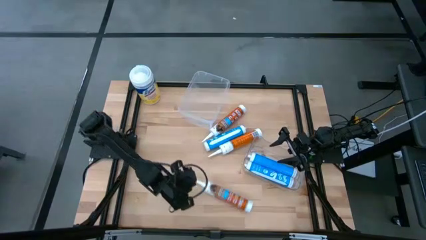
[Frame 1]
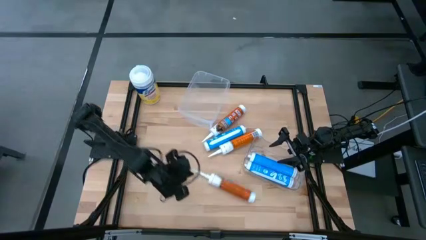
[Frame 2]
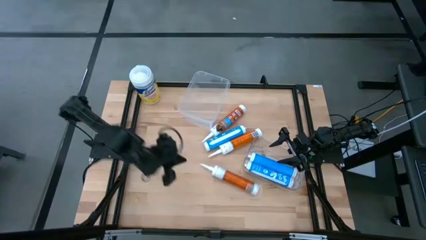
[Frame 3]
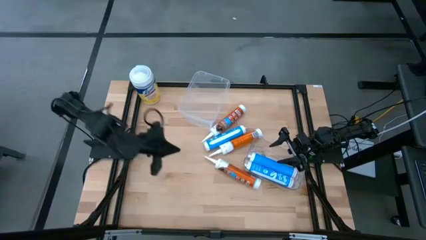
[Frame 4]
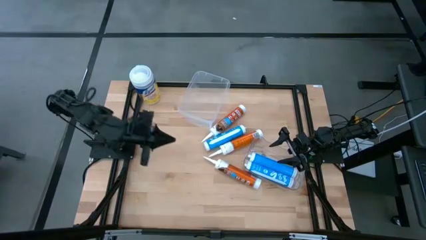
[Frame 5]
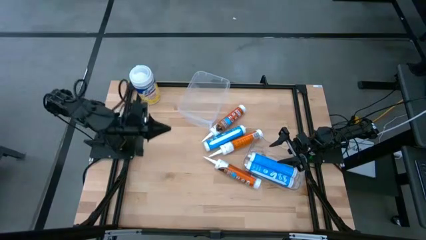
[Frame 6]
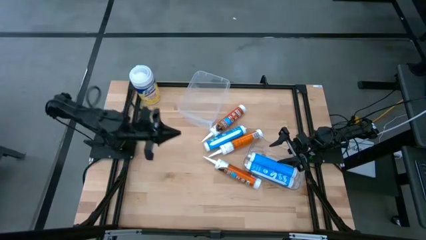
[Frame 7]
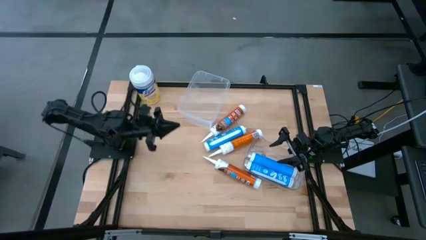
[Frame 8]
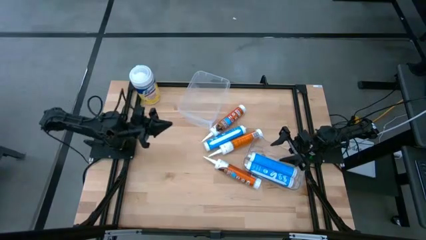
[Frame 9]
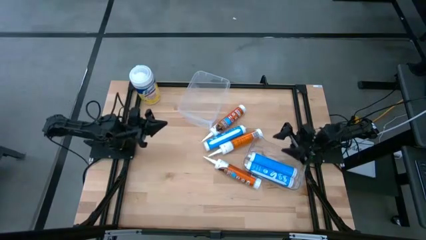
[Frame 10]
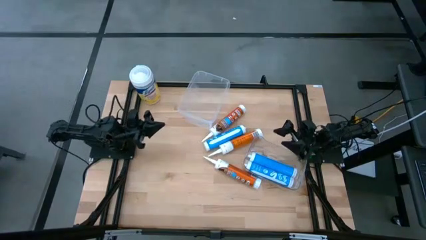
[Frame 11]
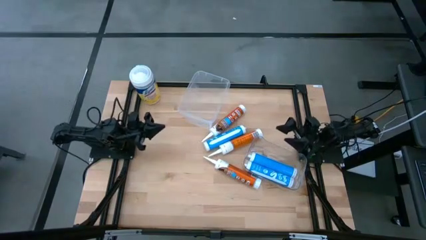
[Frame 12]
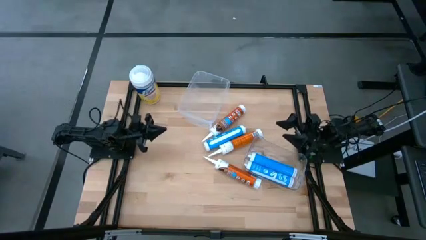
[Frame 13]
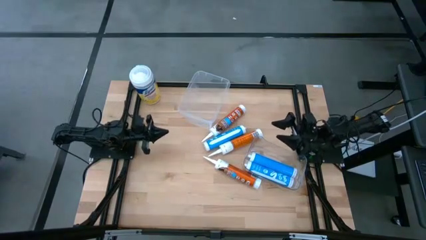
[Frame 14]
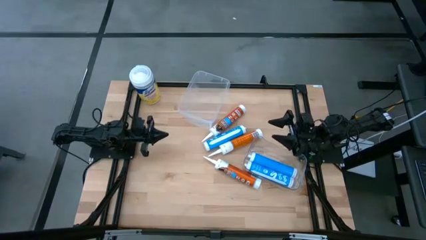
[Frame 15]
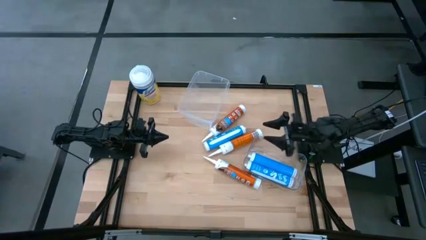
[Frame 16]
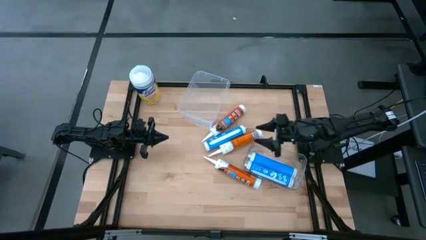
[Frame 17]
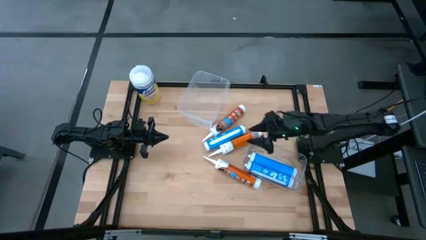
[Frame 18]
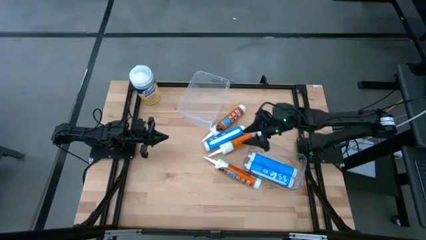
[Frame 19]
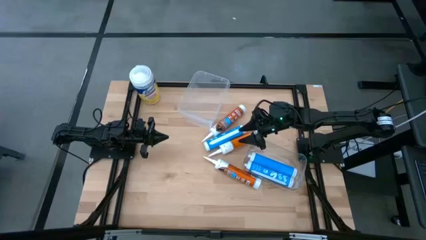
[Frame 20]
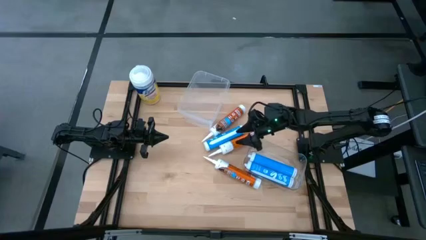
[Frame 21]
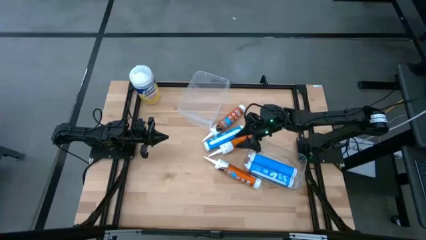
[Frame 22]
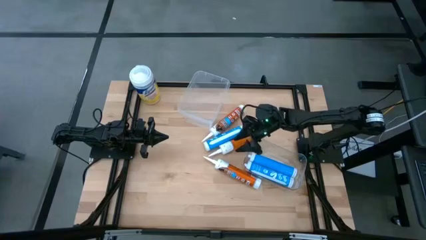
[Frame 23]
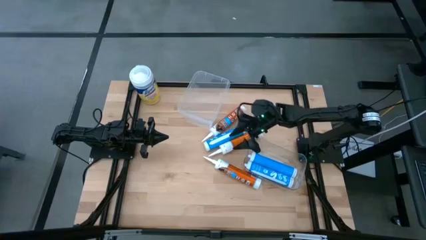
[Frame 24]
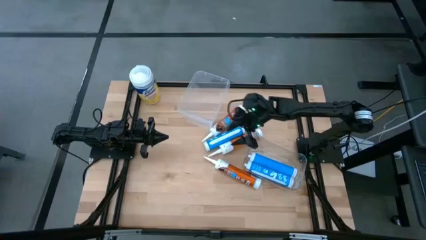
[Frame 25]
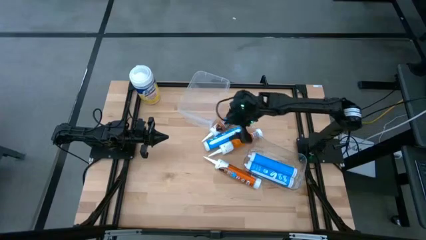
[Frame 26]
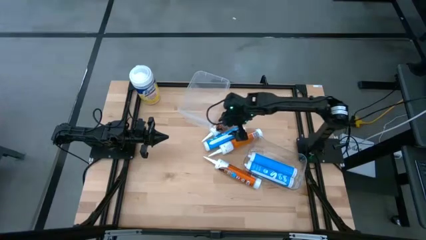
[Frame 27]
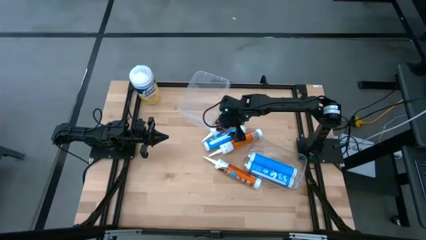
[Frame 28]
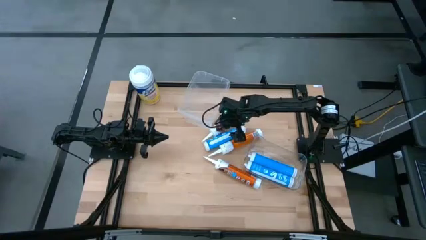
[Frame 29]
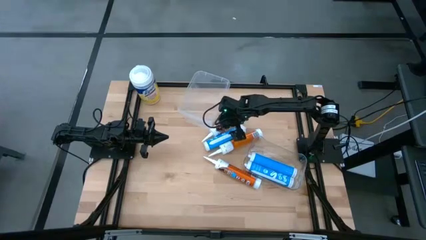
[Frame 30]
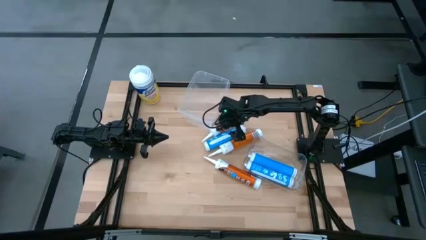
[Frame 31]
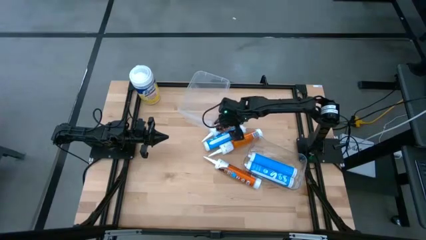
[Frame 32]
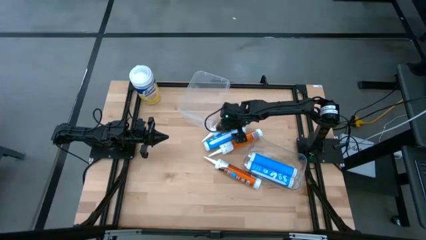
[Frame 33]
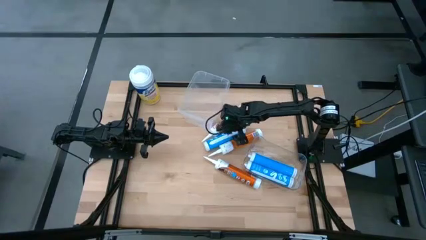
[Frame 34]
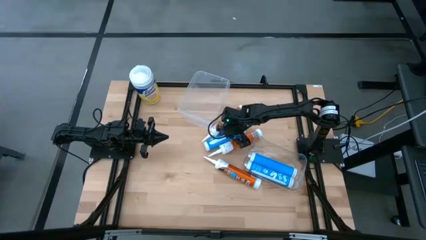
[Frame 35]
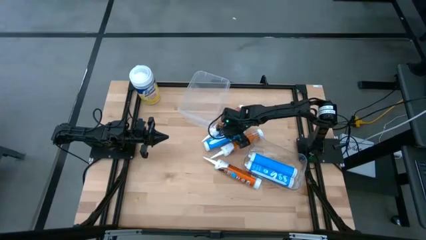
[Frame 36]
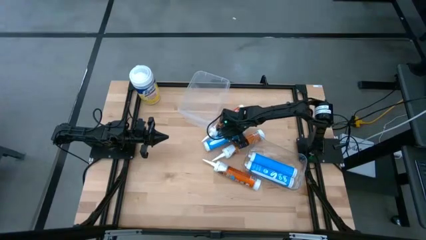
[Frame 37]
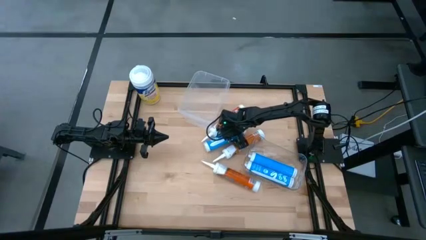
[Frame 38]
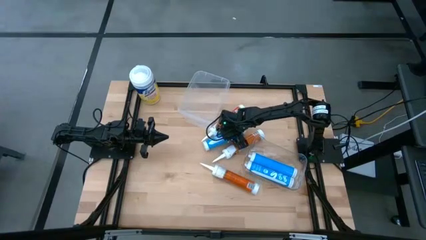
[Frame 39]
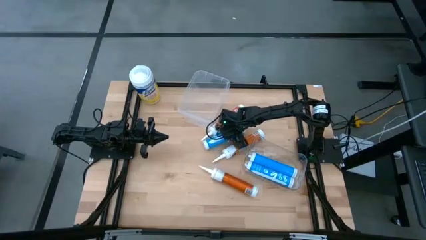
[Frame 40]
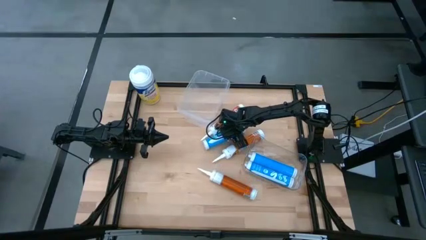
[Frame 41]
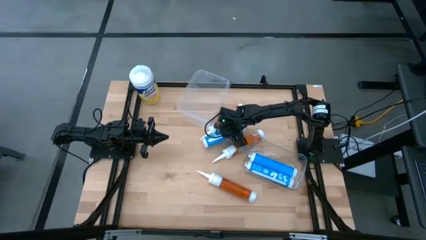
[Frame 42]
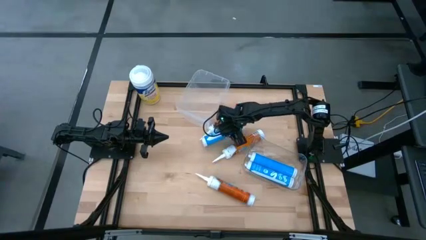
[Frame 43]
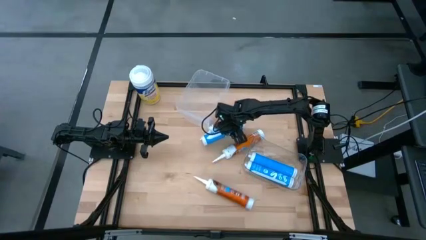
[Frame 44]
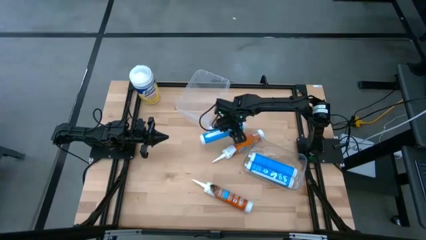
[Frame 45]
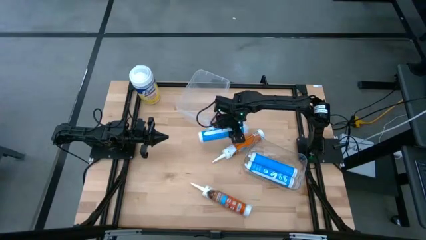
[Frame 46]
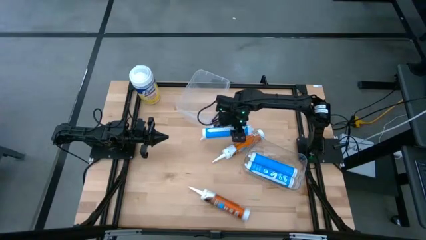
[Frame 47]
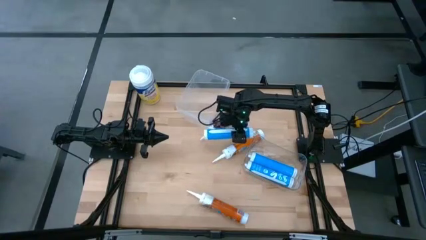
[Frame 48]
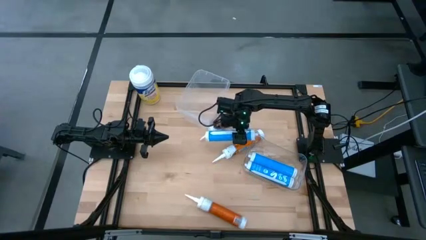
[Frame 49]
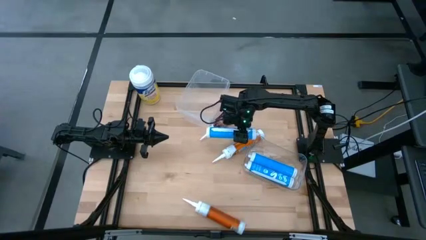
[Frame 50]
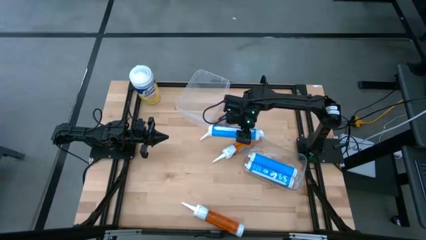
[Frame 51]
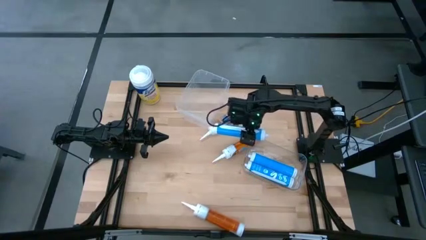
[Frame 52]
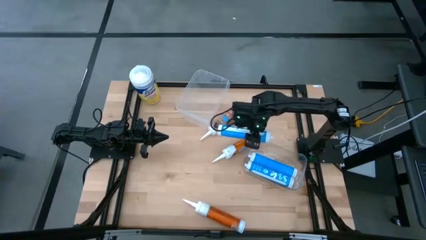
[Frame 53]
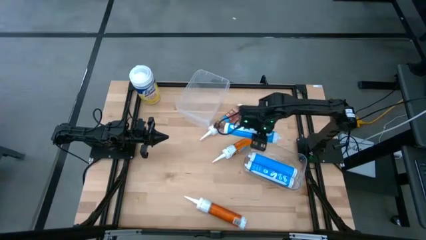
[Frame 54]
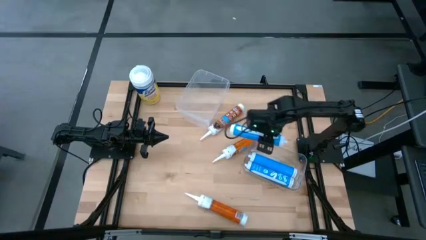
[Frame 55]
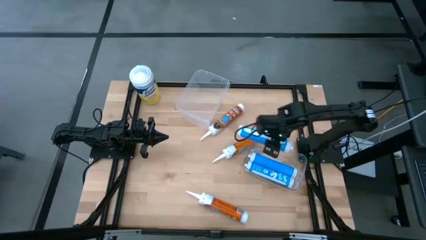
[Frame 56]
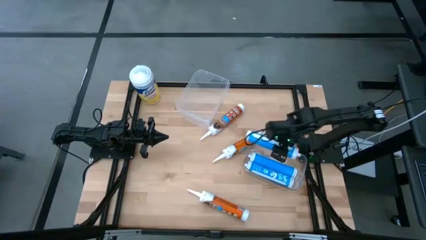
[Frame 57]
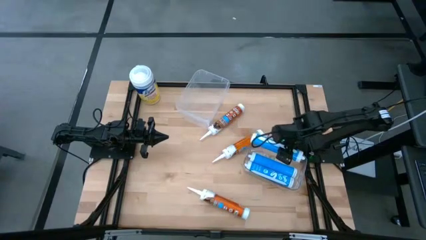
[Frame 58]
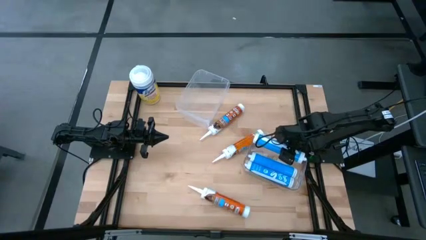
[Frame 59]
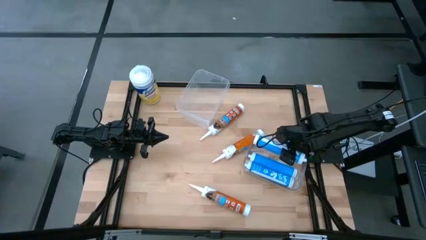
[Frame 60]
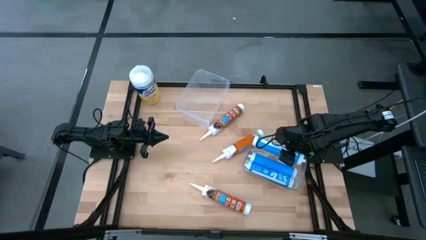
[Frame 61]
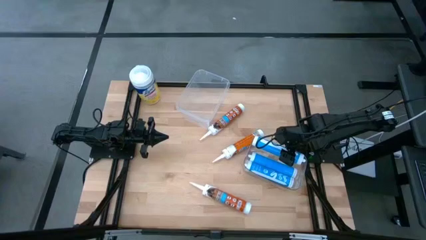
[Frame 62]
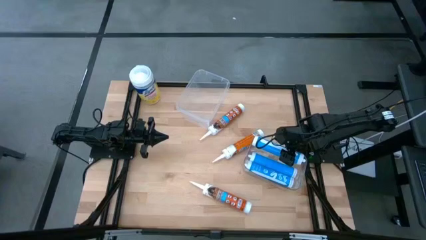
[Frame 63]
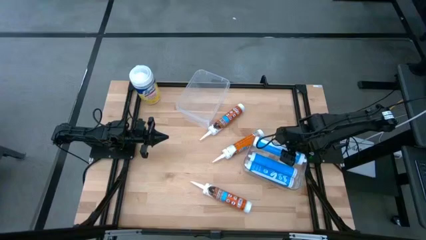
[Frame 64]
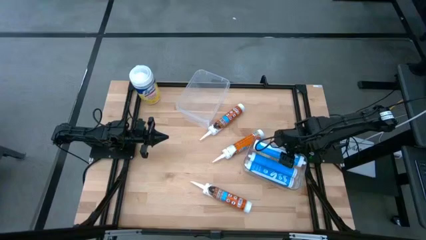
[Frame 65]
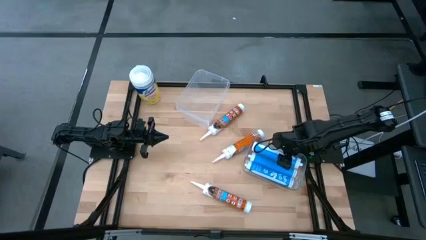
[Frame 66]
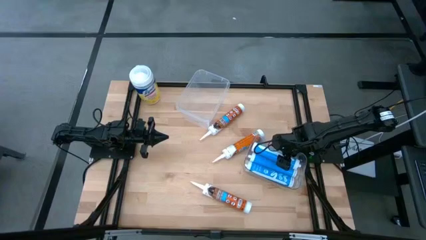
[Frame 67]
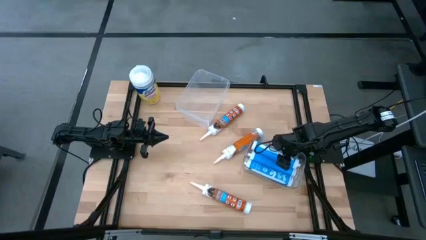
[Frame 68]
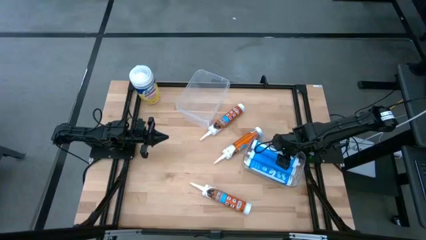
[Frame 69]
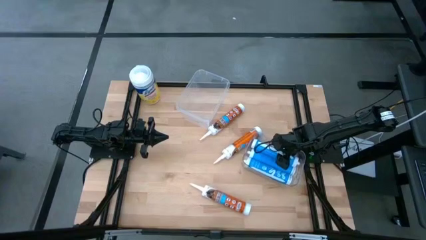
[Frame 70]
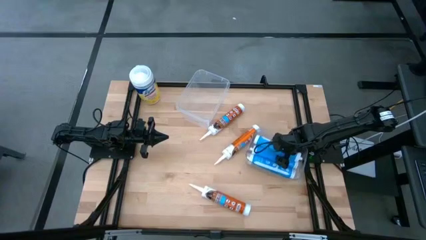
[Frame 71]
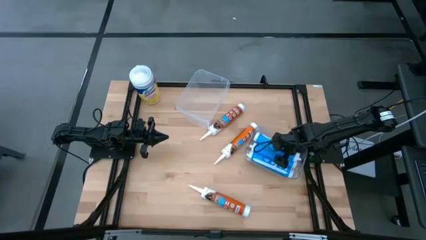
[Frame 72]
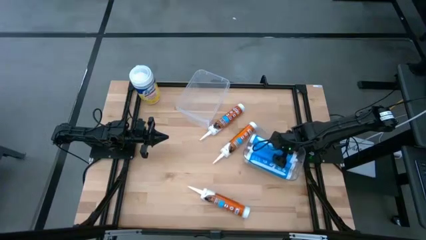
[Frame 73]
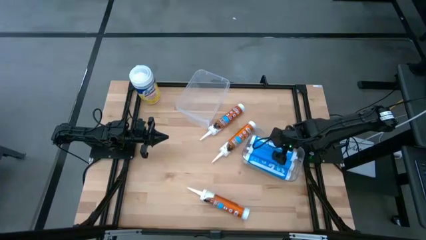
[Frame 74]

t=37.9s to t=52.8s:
Task: Pick & place silicon tubes, Sealant and Lysol wipes
Put the blue sealant into the transparent bin

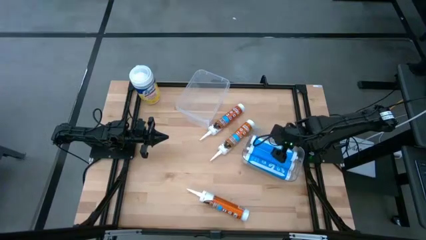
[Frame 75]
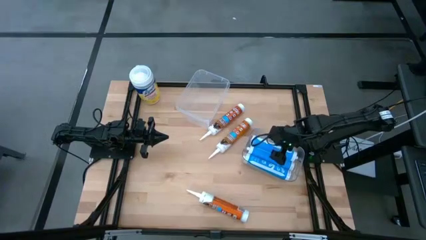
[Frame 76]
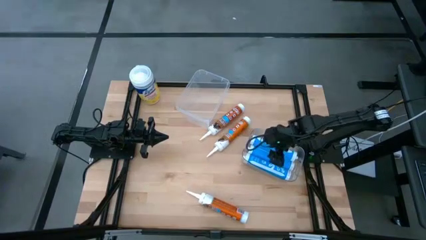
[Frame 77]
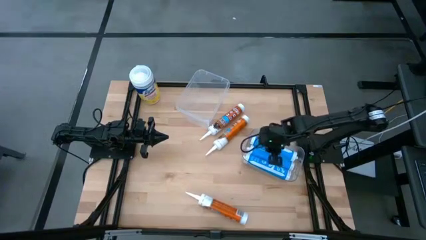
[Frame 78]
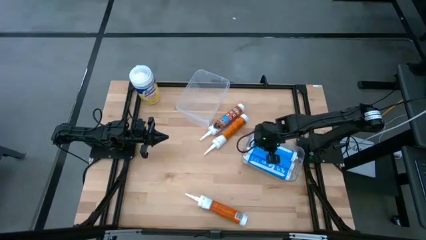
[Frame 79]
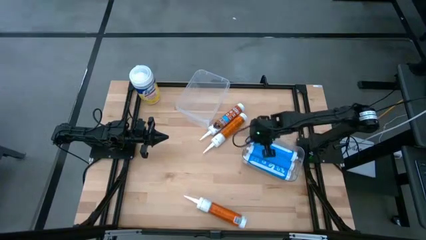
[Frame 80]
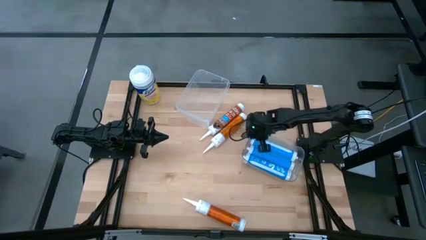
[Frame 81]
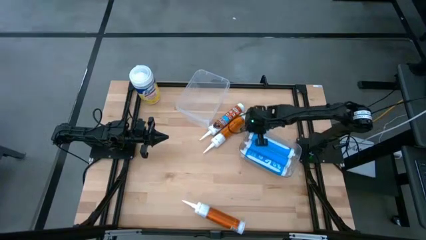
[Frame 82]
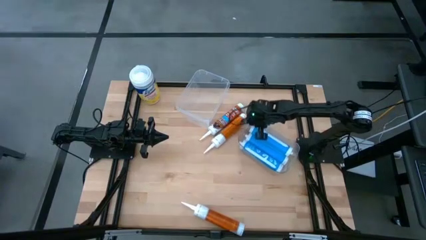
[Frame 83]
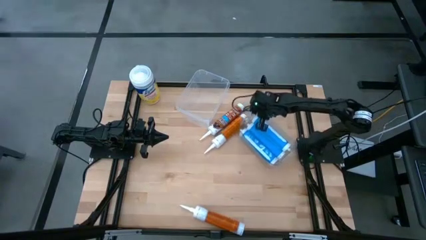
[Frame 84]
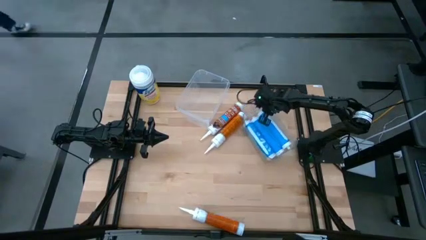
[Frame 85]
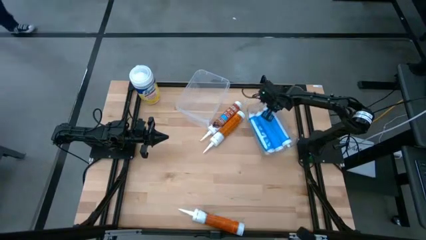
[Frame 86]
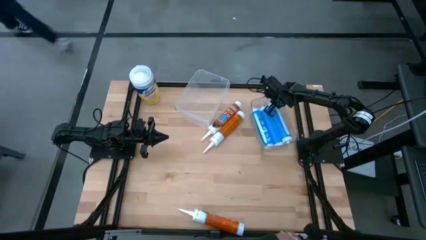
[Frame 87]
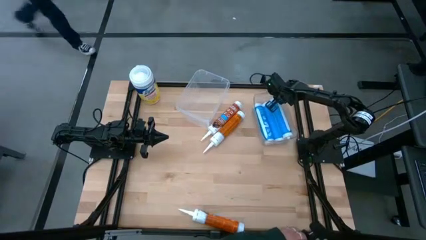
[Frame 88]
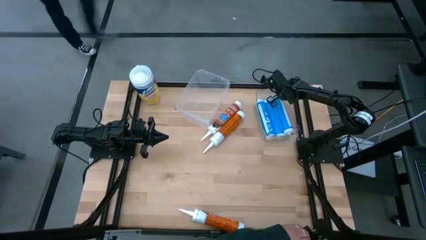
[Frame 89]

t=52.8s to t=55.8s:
Move the bottom transparent bin to the top
